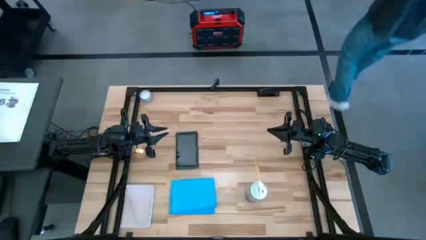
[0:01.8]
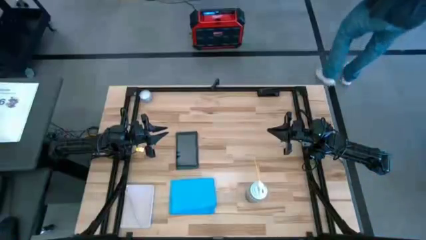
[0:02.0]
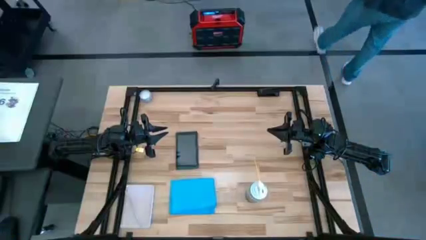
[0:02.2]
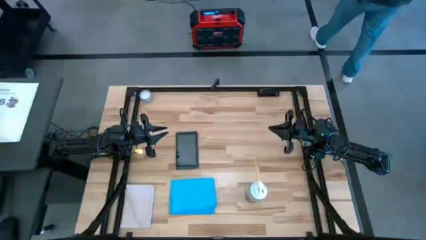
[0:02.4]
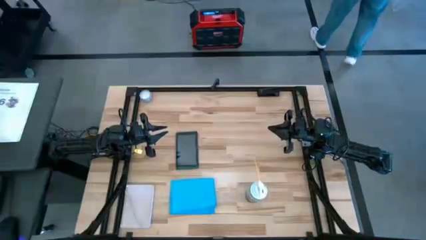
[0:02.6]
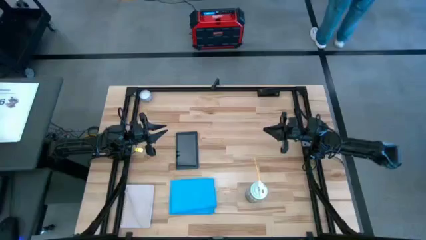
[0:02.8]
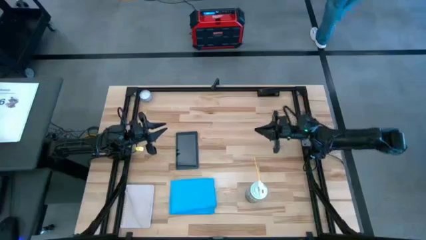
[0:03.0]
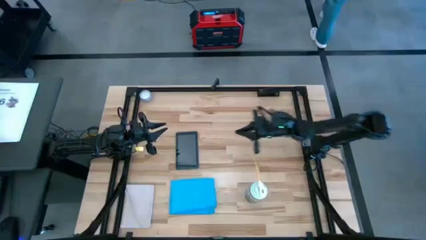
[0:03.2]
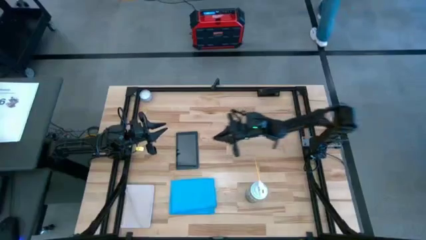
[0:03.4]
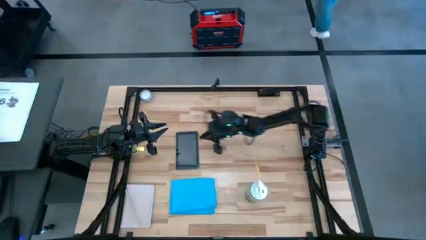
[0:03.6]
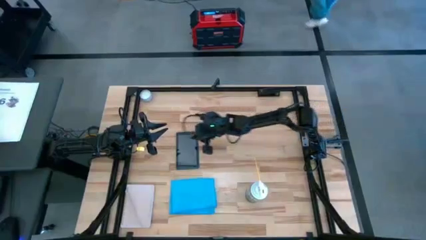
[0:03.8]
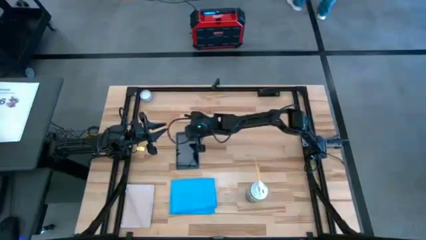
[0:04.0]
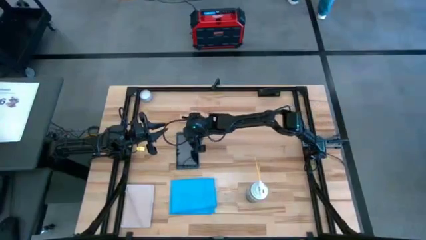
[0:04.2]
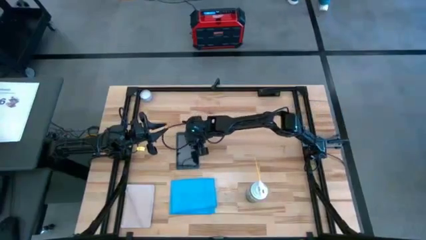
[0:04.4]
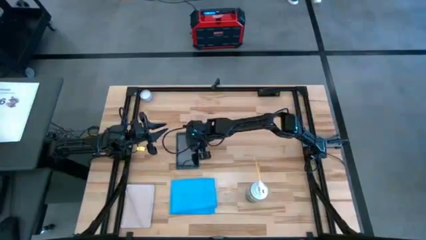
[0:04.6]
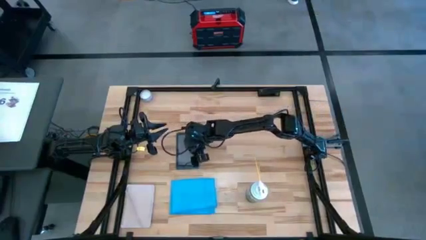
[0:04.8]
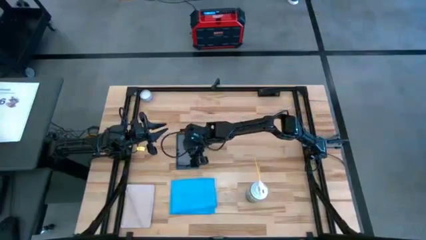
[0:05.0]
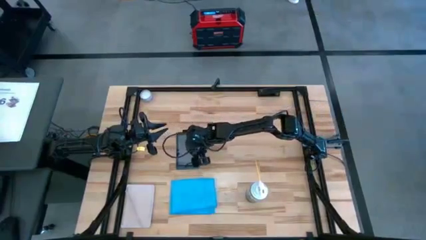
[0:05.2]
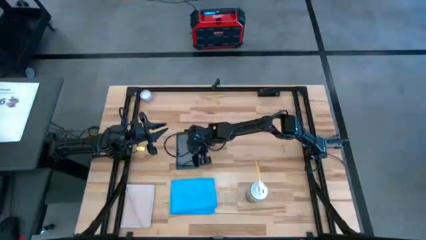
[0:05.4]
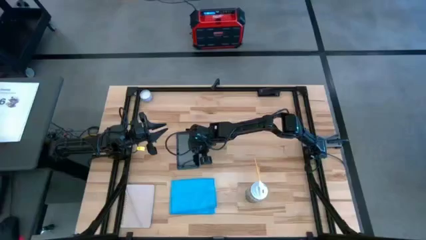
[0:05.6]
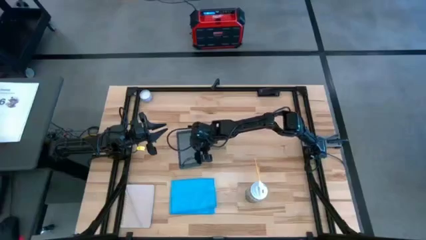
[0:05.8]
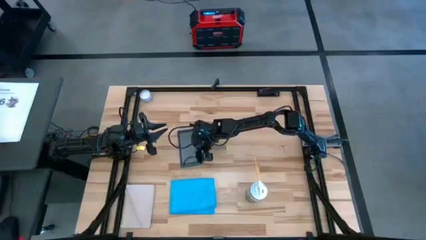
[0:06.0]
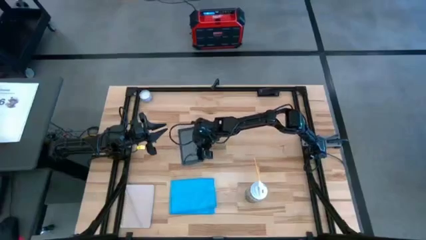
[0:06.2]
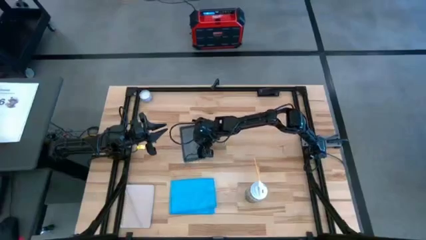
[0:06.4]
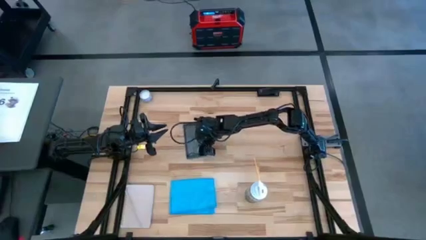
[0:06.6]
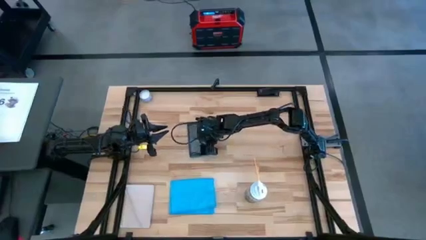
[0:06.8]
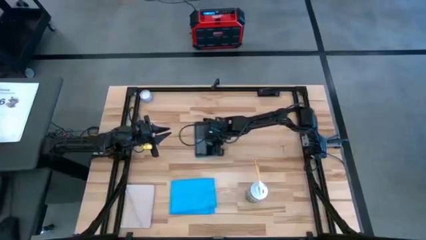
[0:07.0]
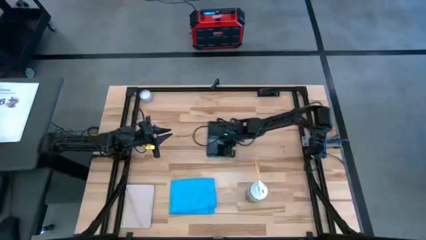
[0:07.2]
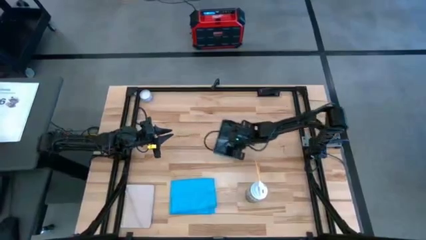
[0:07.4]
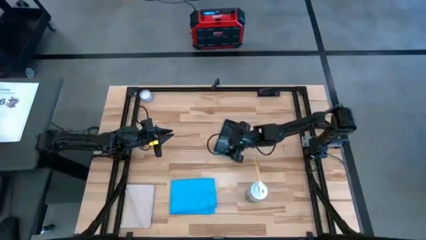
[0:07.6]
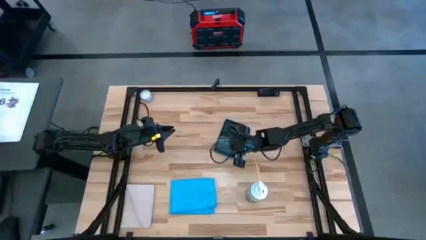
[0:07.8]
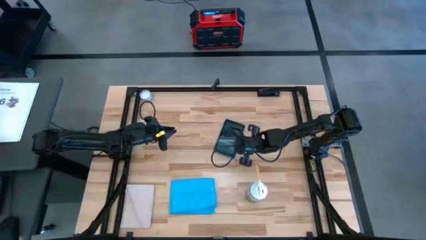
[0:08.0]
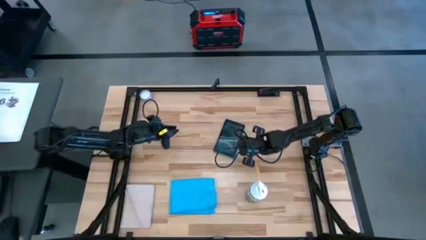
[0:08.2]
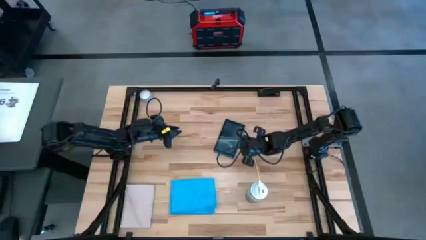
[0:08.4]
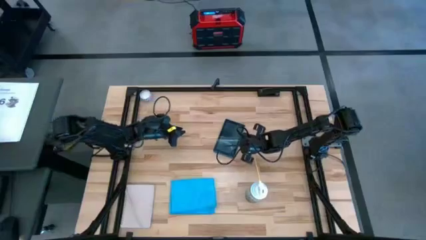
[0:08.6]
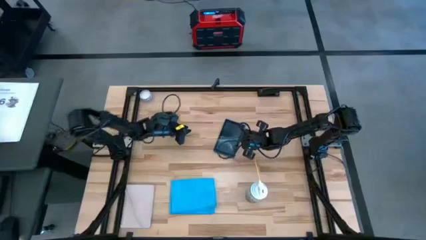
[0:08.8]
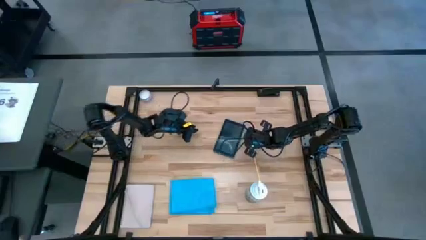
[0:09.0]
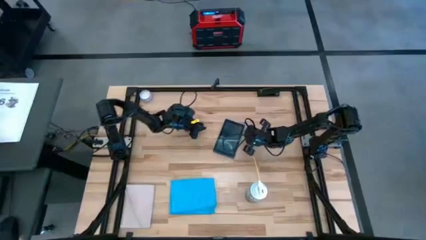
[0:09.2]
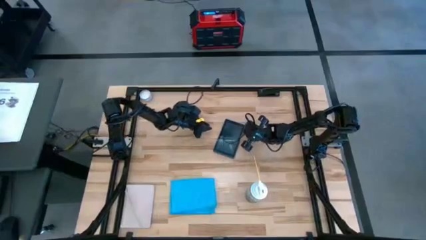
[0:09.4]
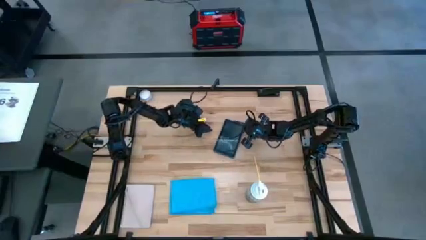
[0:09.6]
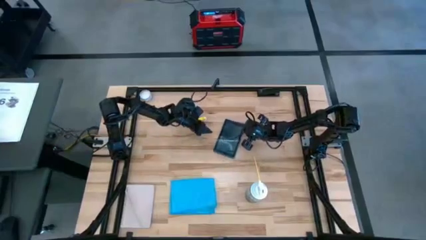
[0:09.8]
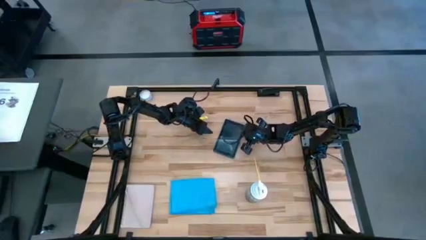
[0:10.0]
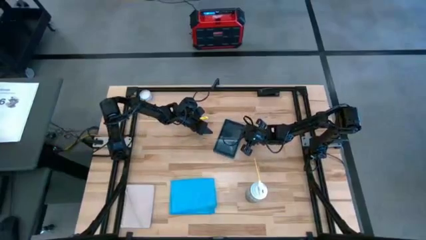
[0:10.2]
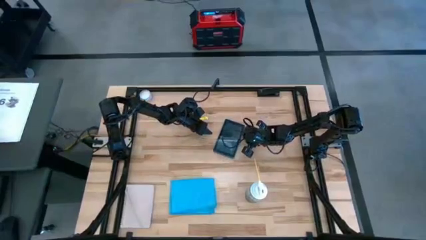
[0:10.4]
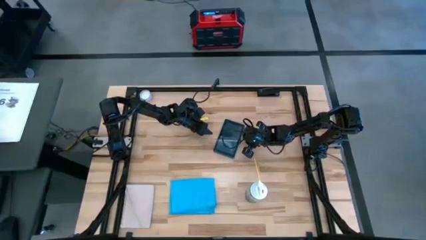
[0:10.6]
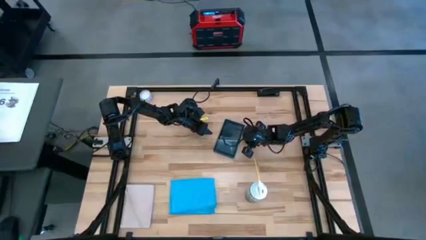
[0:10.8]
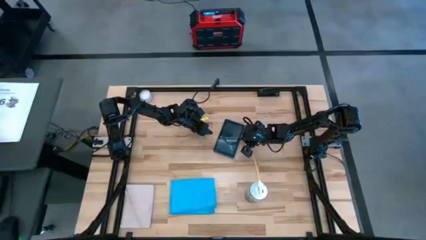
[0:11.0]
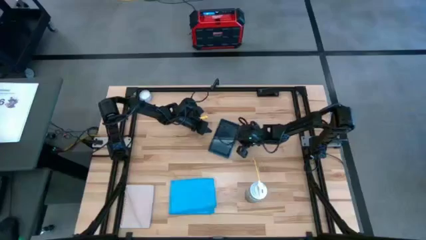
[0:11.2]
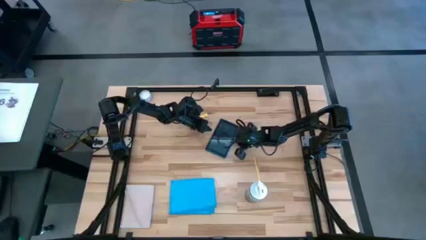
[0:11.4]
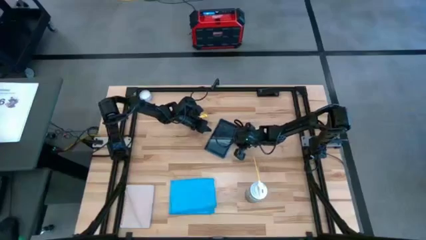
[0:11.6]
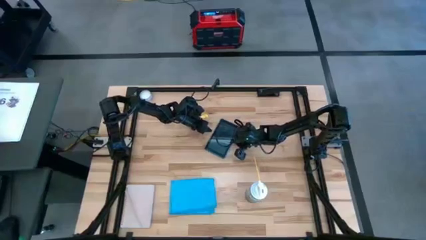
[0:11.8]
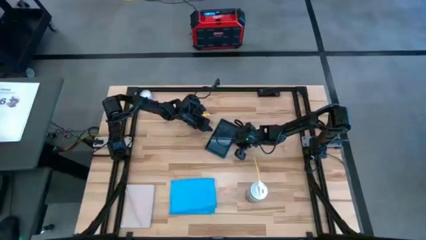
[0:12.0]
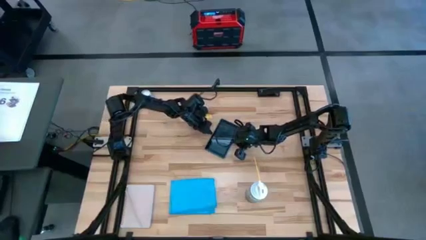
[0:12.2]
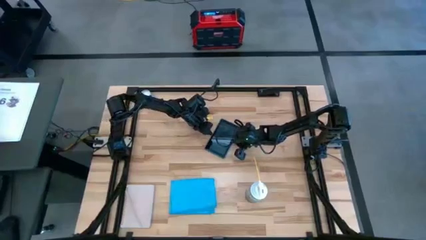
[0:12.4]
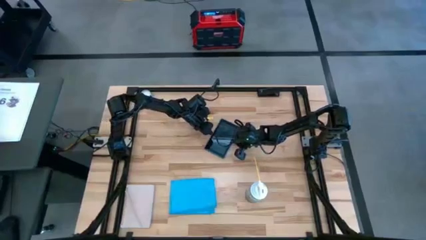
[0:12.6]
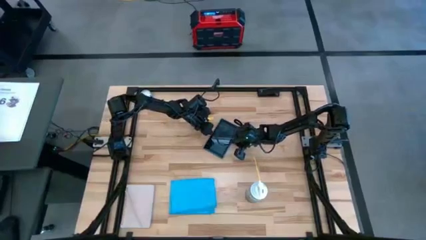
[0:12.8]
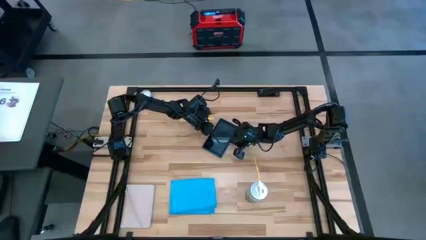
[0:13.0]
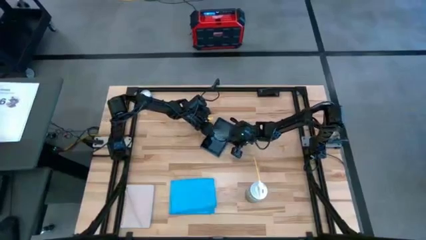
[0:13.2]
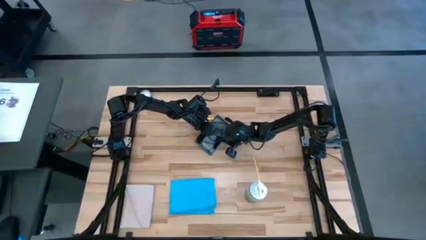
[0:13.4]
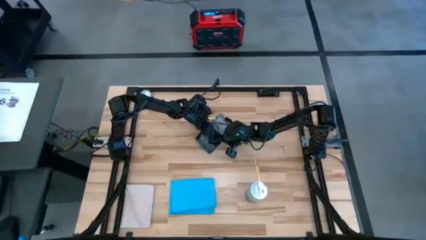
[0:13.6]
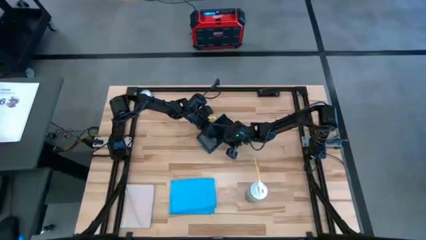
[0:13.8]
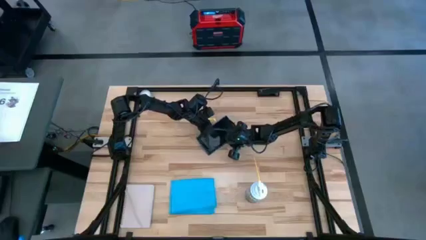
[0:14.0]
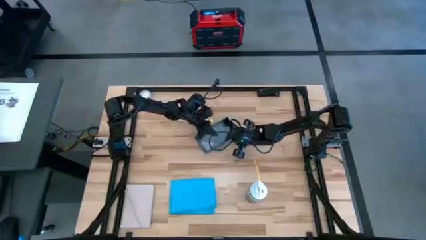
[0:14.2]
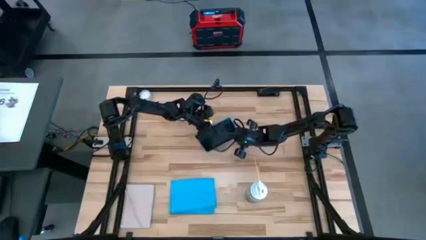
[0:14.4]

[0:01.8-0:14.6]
Task: Apply microfiber cloth
Spray the front of the blue tablet with the spray bottle
